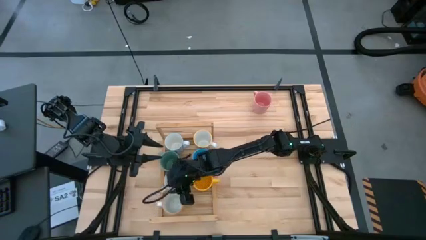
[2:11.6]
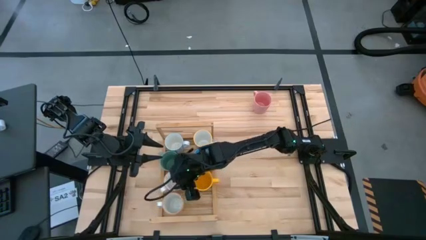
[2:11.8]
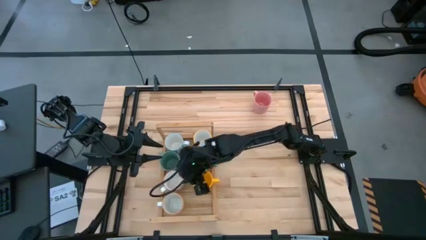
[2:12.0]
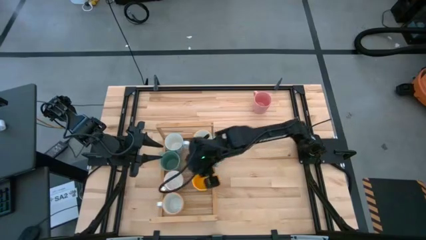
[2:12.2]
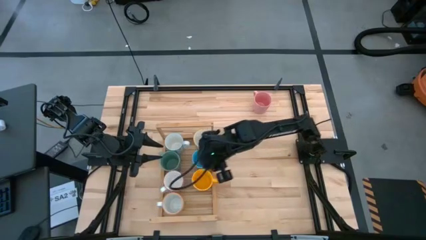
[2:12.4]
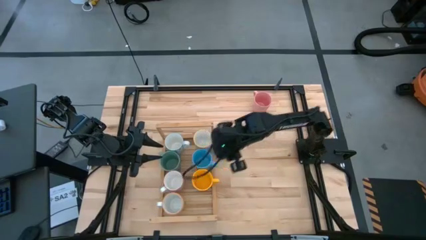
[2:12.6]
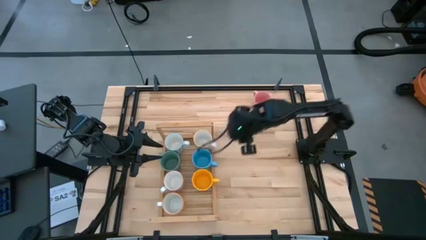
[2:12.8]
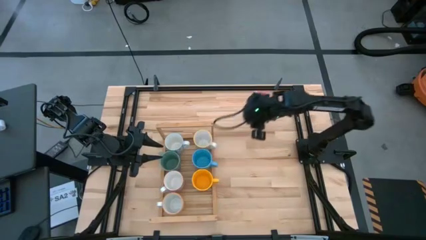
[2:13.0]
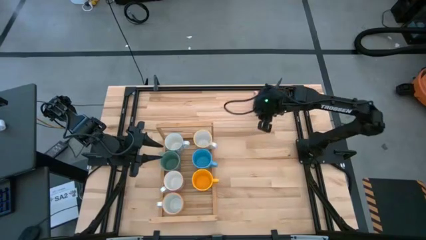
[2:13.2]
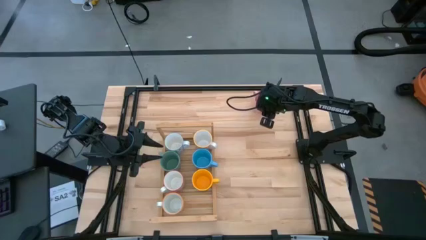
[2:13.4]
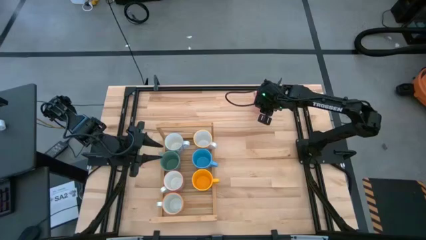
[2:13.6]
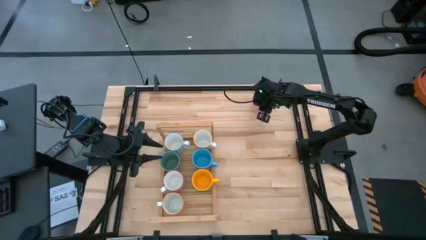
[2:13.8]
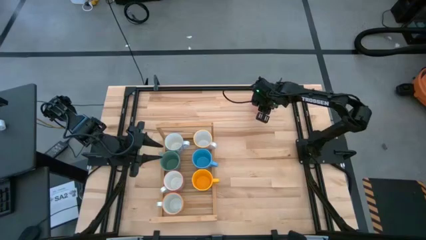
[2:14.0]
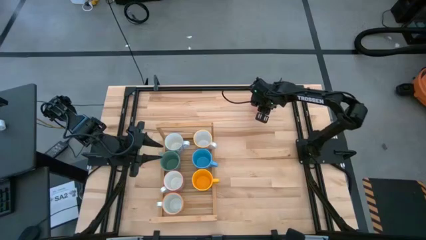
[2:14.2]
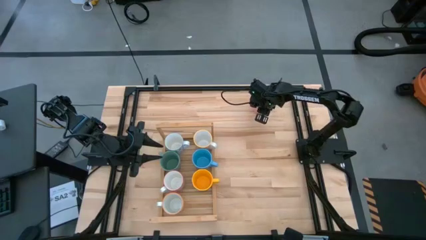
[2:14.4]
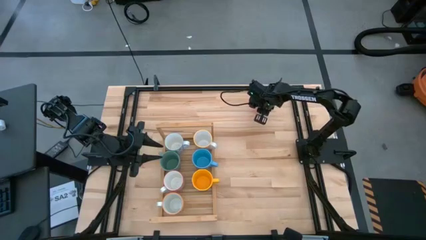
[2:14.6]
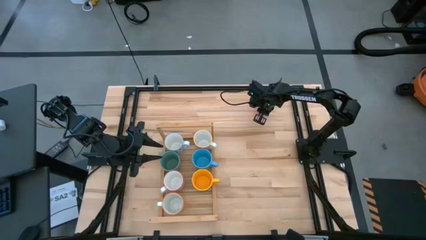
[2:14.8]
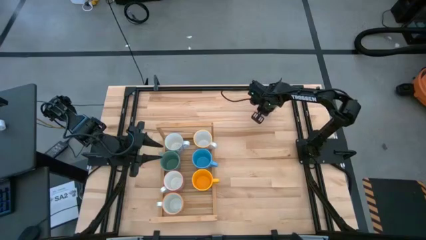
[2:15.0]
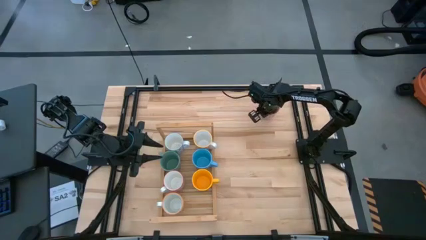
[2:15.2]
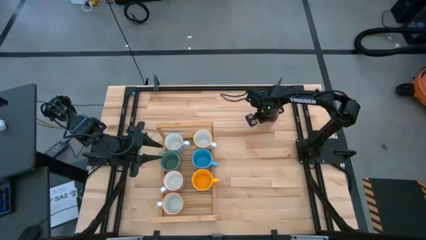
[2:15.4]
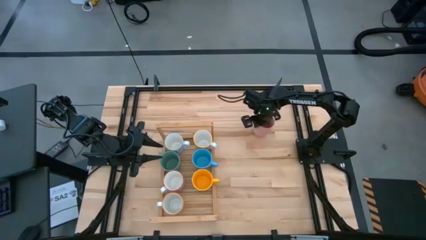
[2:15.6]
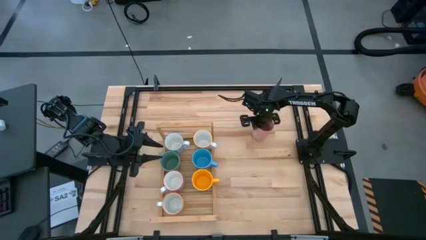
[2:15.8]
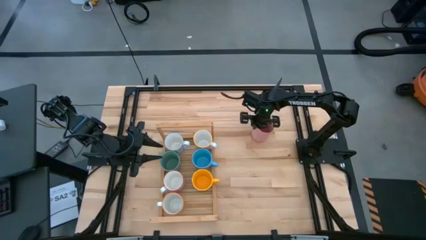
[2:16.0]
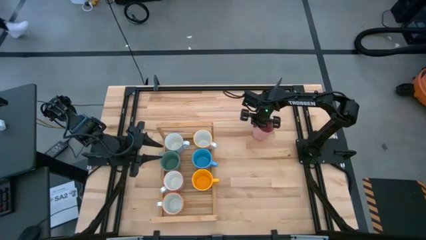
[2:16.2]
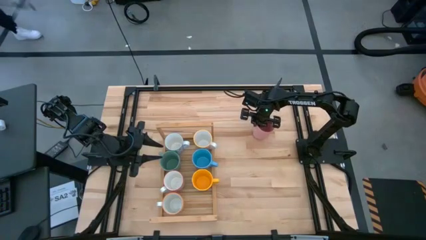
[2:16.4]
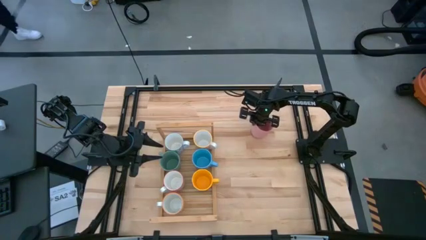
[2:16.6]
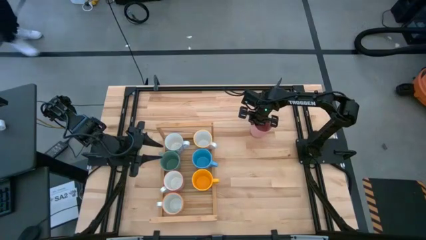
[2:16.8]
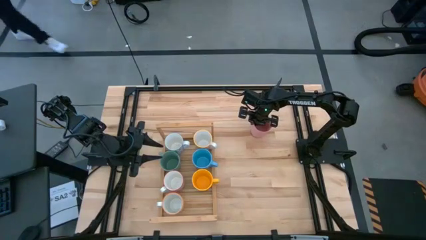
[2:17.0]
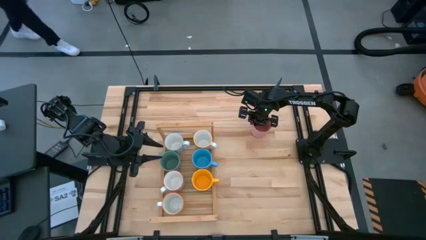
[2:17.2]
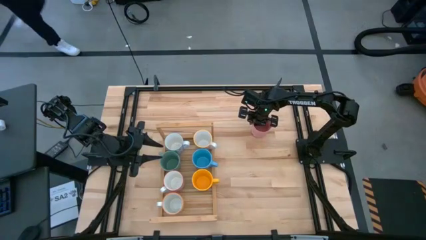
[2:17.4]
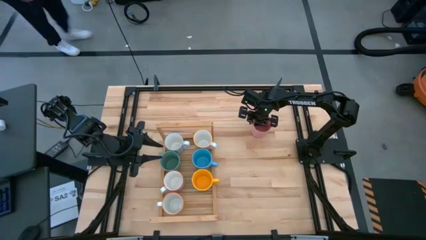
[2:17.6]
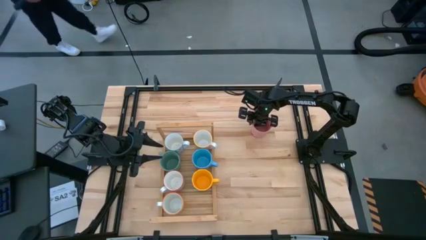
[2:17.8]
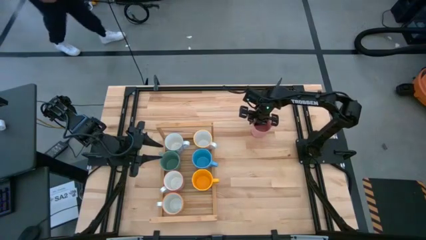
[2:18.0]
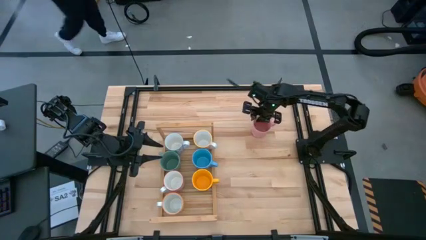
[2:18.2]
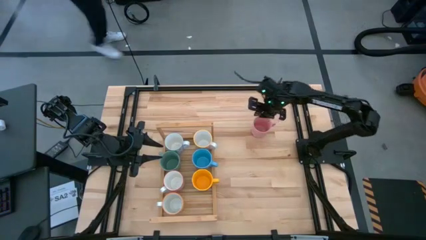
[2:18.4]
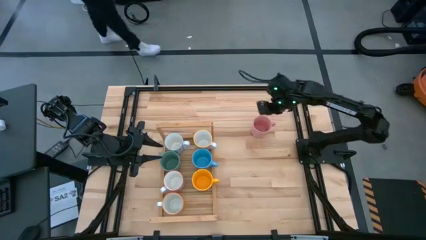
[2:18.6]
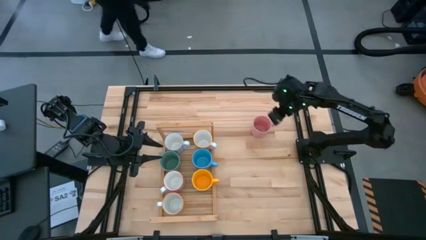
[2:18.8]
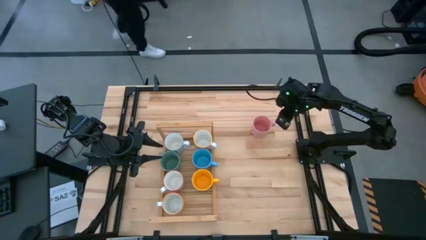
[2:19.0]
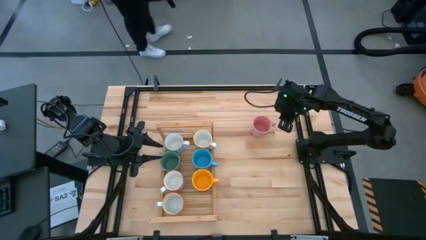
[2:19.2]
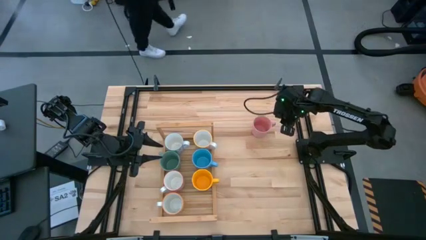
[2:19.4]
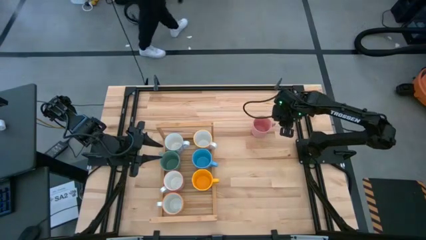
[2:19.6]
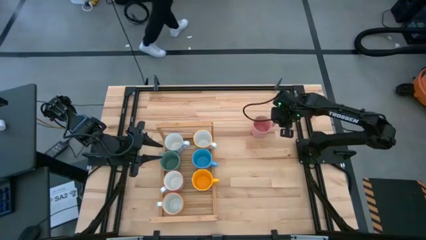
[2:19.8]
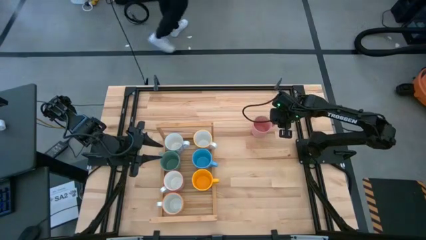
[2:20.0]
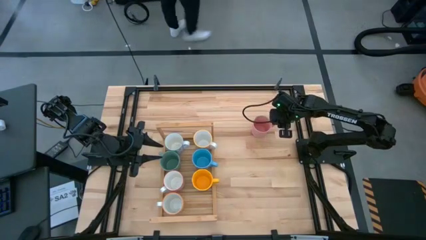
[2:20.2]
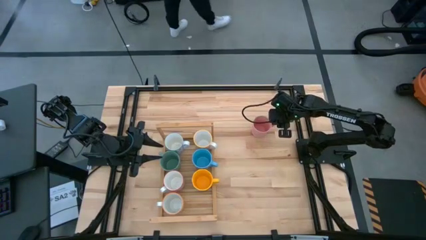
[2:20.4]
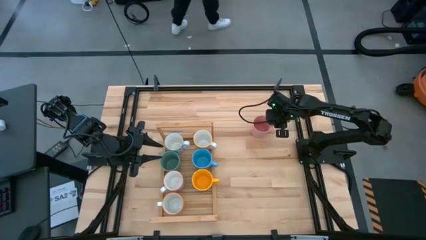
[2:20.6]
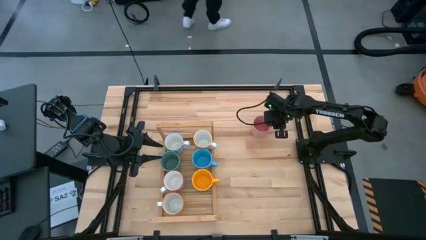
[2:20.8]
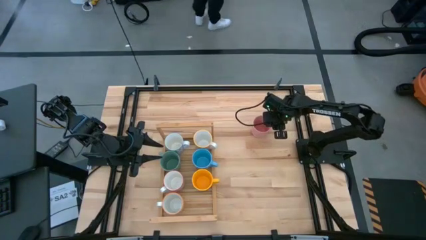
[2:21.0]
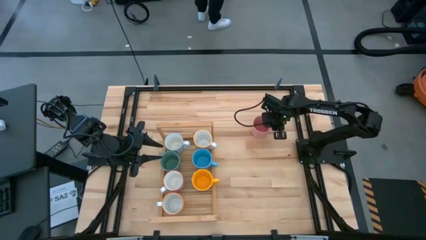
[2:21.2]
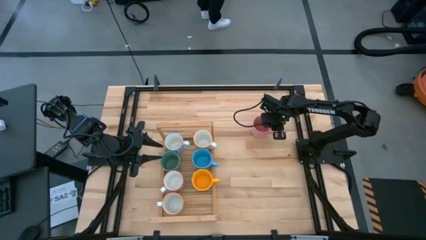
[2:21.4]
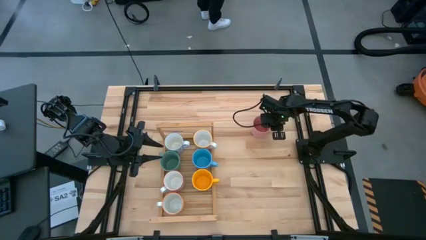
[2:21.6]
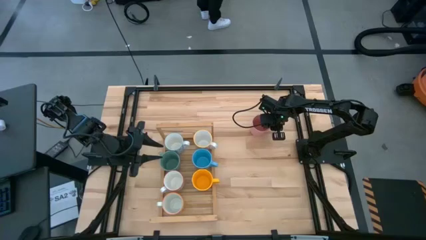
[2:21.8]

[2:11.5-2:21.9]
Task: Place coffee mugs
Put the pink mug on the shelf aligned with the yellow and white mug

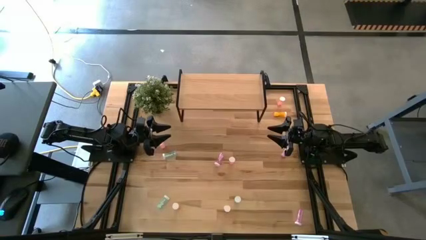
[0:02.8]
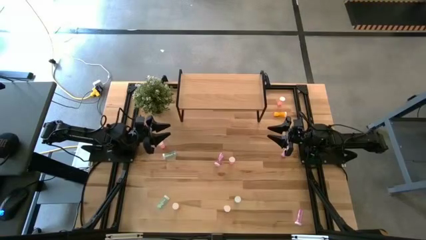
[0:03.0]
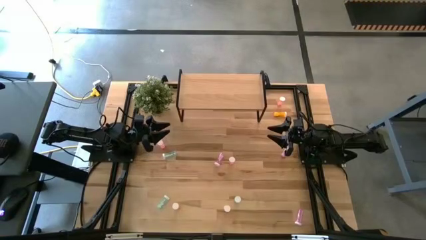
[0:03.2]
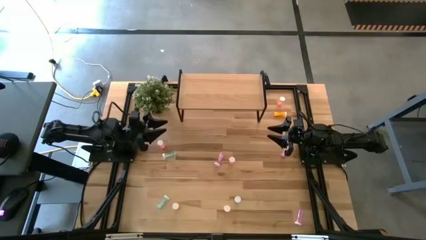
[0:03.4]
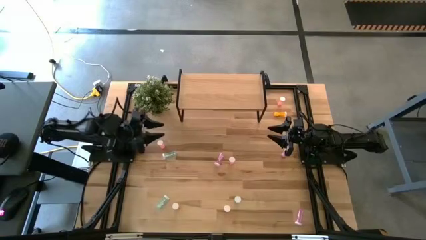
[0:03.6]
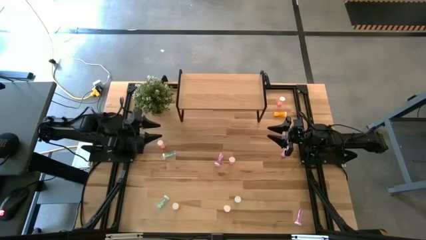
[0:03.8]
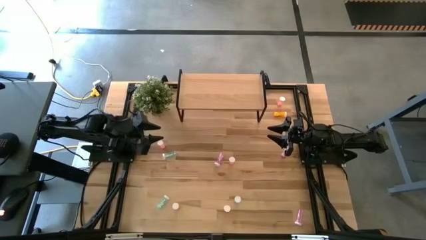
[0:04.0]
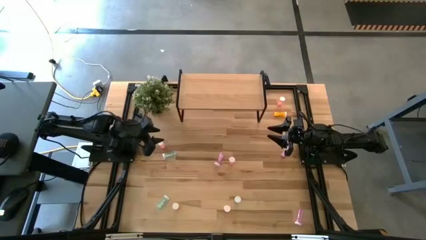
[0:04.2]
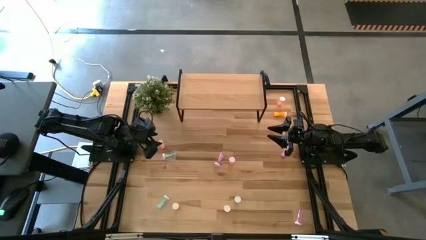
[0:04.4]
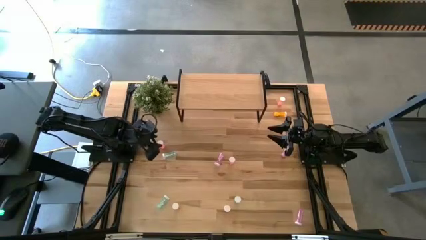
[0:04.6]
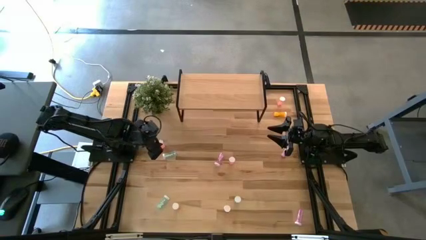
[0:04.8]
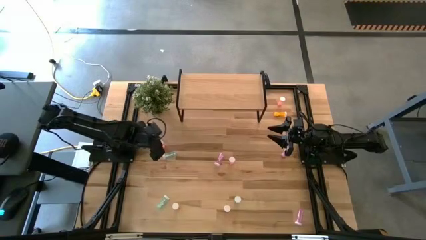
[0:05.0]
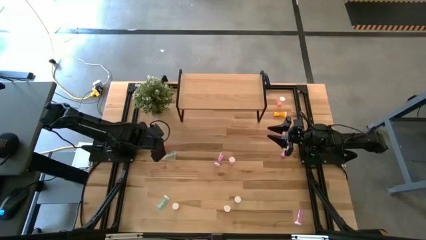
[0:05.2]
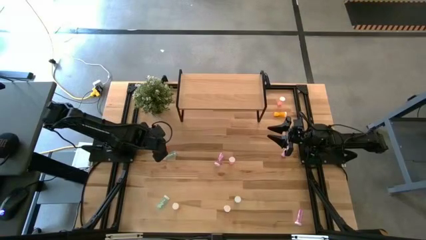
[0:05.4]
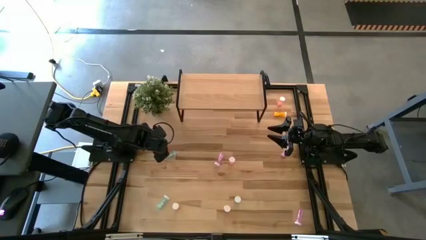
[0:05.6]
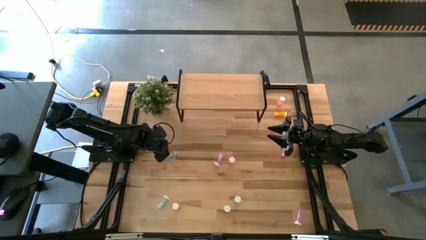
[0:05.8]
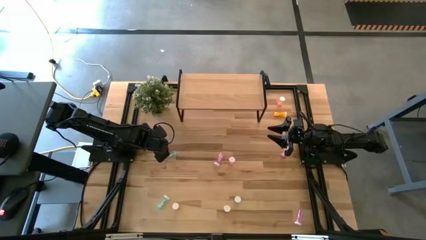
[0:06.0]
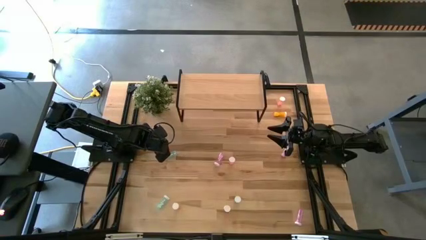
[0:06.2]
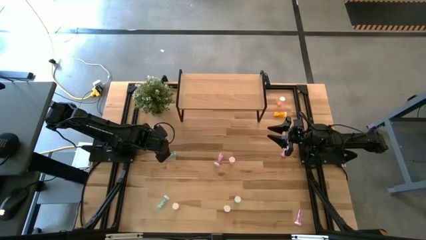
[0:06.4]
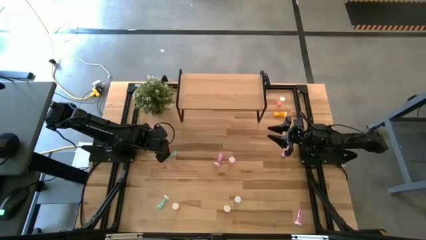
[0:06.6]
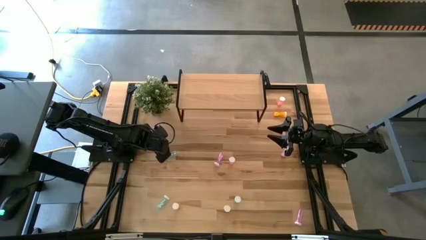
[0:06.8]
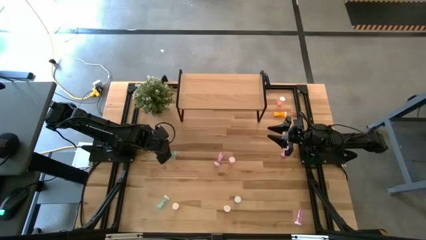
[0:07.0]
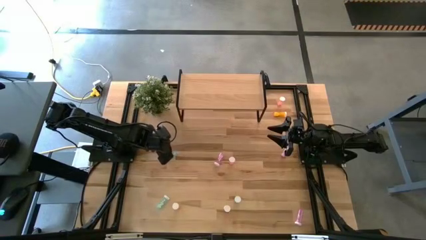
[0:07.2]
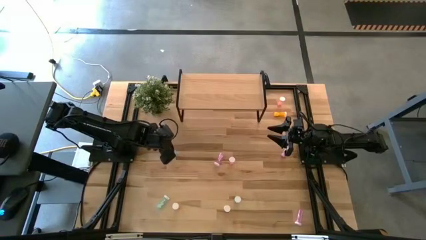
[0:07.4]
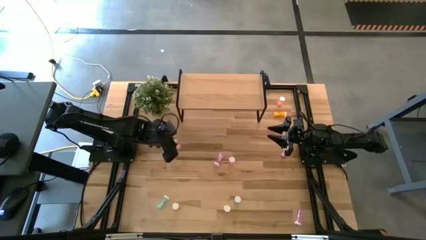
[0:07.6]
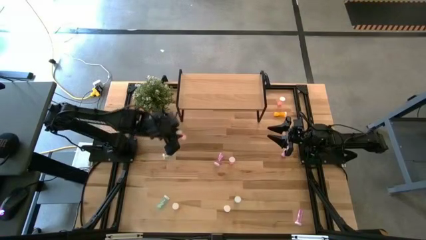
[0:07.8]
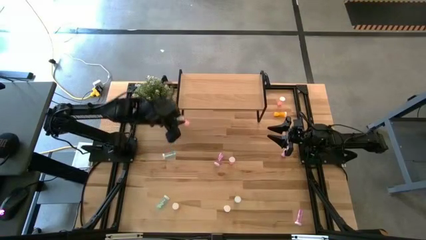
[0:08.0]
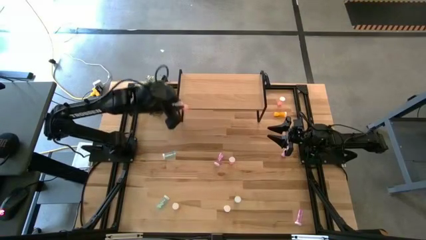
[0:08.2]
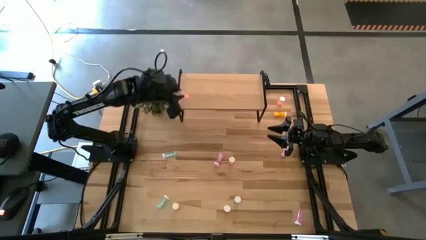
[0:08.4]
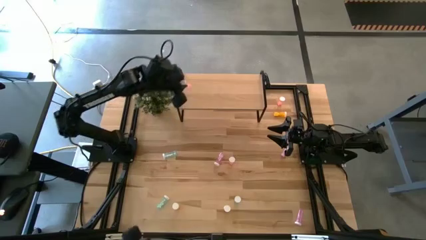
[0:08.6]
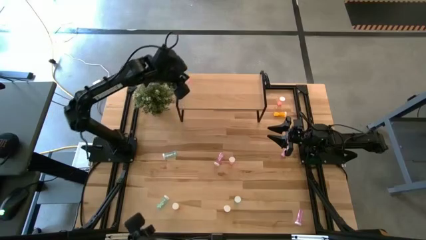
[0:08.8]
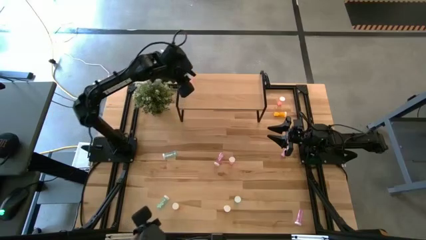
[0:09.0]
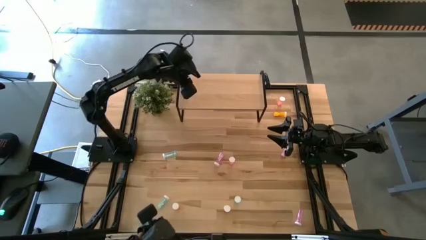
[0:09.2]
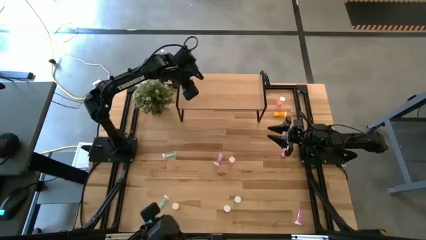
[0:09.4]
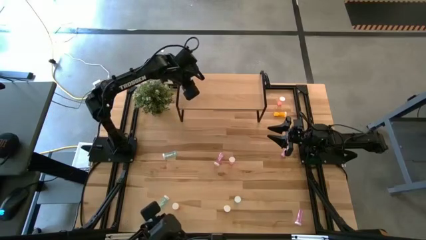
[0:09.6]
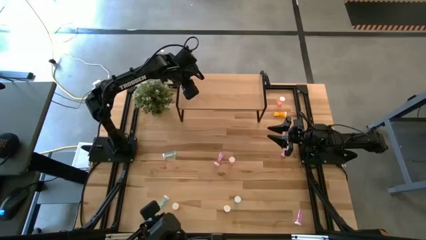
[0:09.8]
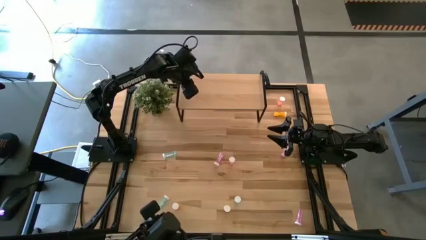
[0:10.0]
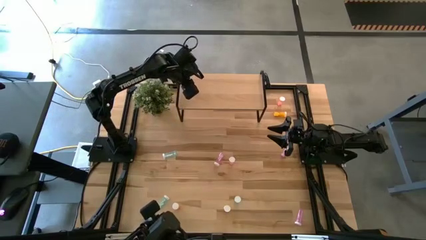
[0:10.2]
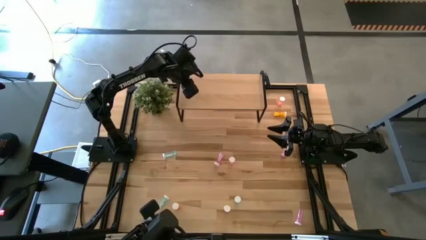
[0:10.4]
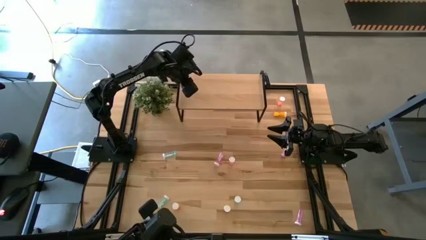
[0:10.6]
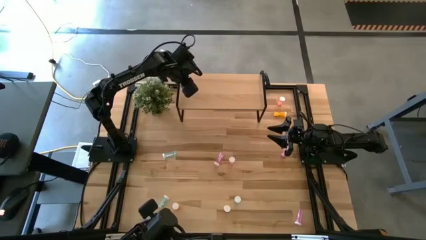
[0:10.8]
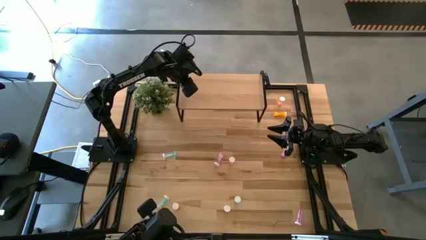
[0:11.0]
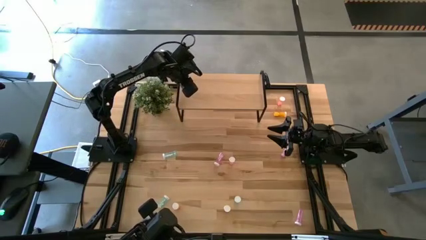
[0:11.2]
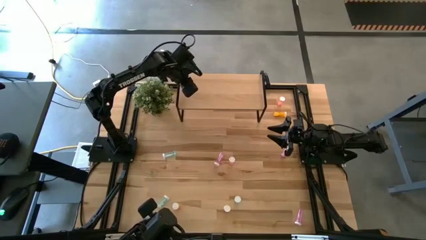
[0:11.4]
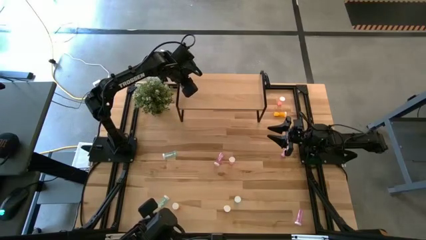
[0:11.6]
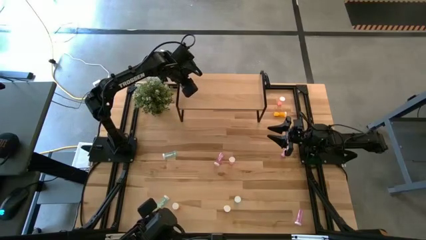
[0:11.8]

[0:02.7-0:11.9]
Task: Pick and place medicine bottles onto shelf by color
Put the middle left pink pill bottle on the shelf
